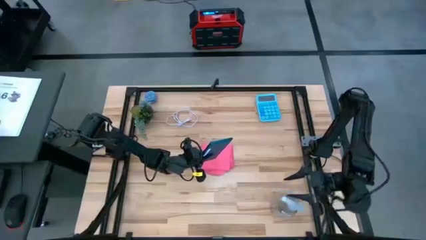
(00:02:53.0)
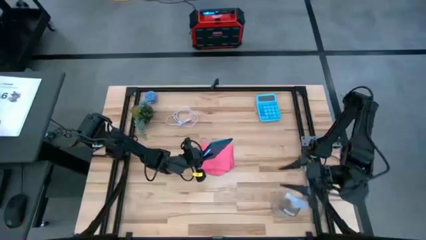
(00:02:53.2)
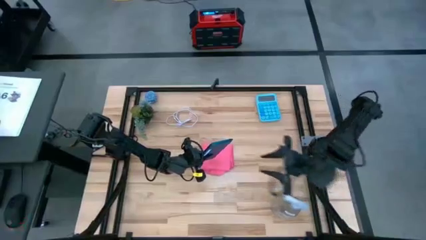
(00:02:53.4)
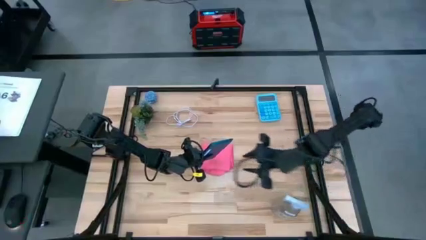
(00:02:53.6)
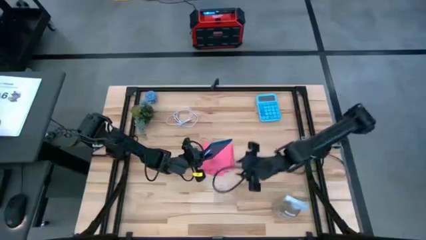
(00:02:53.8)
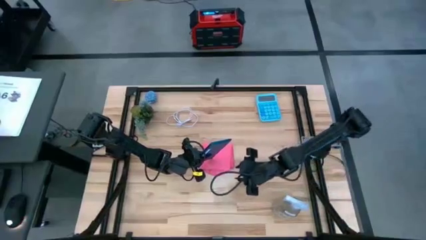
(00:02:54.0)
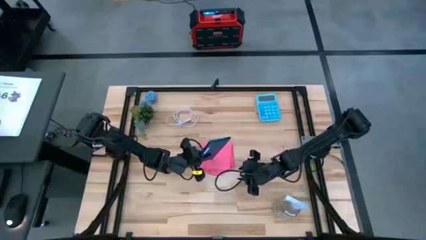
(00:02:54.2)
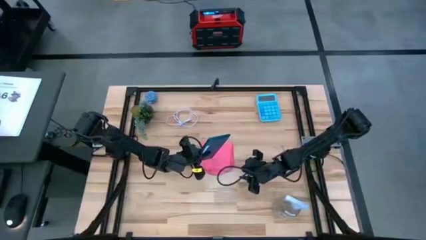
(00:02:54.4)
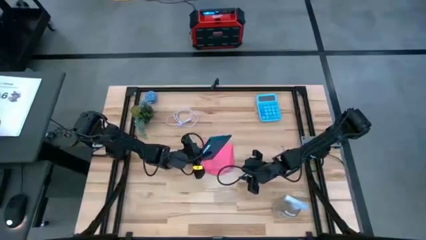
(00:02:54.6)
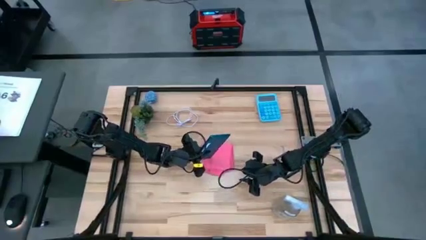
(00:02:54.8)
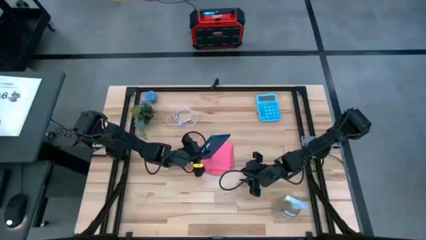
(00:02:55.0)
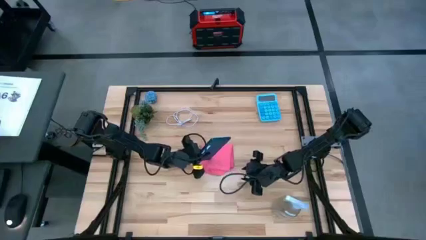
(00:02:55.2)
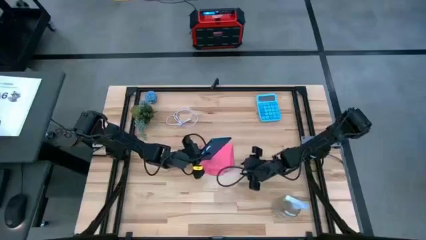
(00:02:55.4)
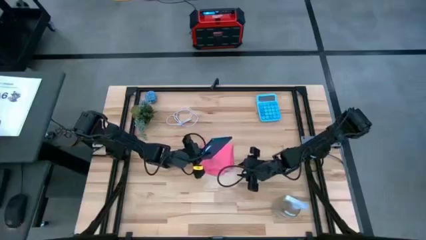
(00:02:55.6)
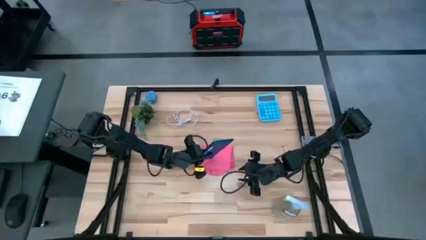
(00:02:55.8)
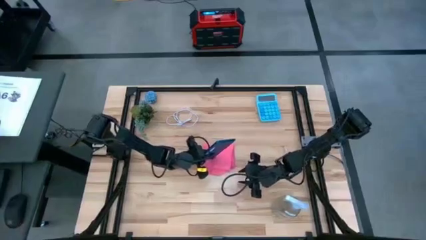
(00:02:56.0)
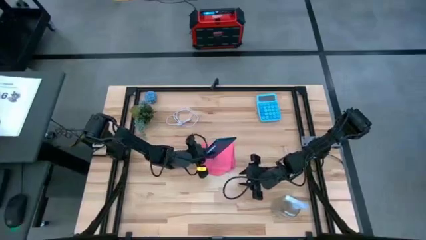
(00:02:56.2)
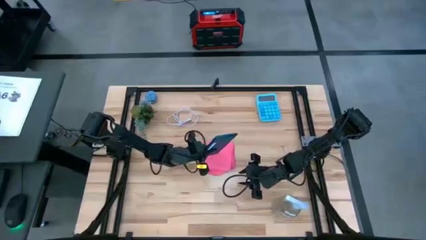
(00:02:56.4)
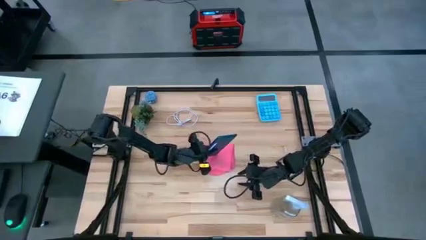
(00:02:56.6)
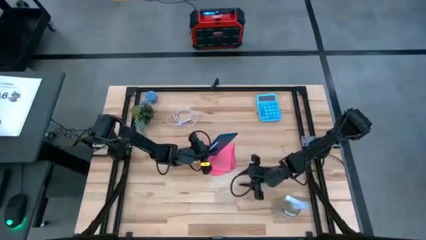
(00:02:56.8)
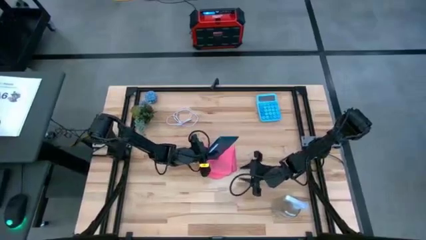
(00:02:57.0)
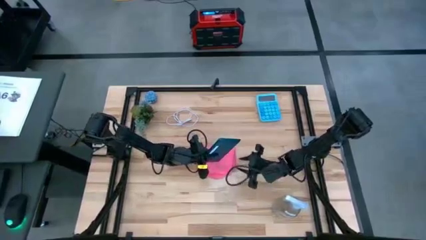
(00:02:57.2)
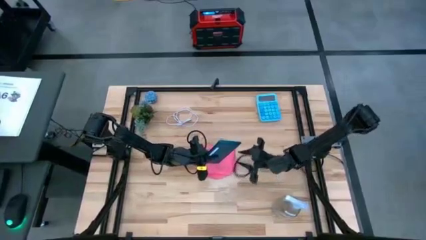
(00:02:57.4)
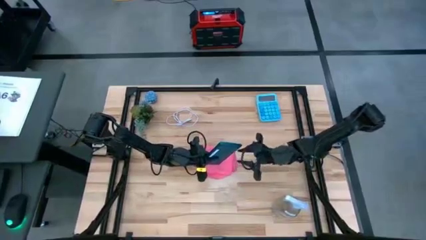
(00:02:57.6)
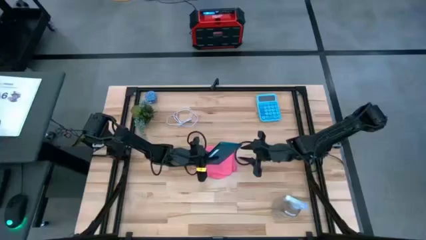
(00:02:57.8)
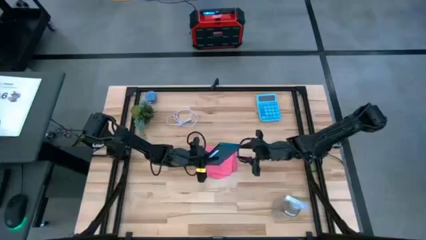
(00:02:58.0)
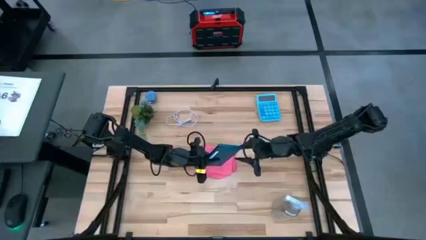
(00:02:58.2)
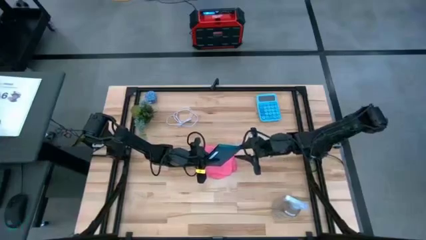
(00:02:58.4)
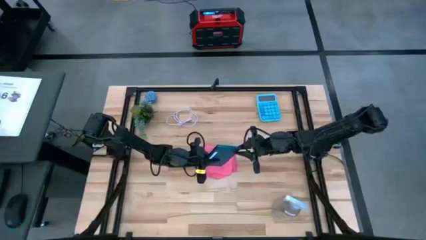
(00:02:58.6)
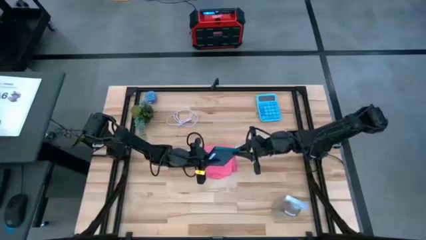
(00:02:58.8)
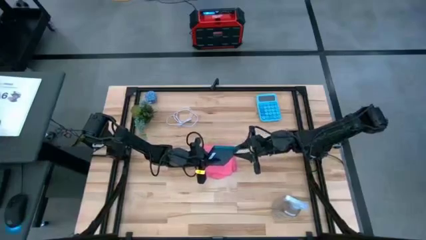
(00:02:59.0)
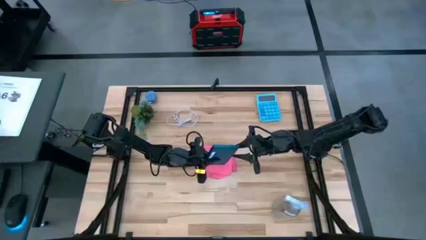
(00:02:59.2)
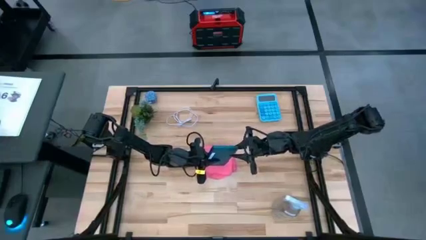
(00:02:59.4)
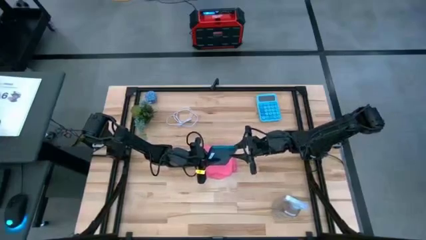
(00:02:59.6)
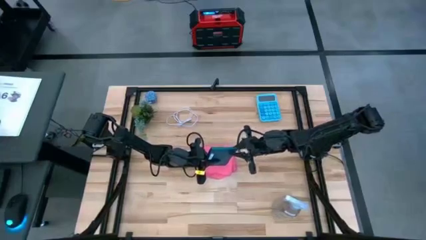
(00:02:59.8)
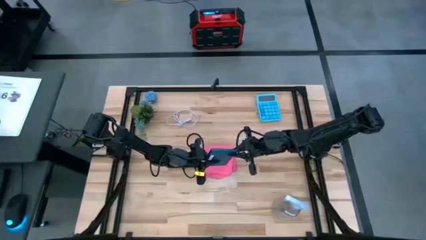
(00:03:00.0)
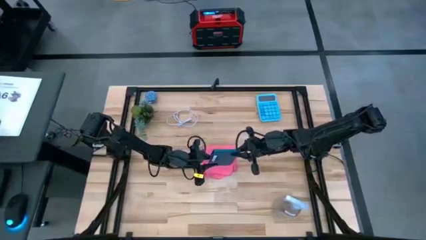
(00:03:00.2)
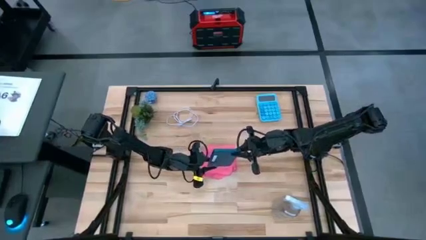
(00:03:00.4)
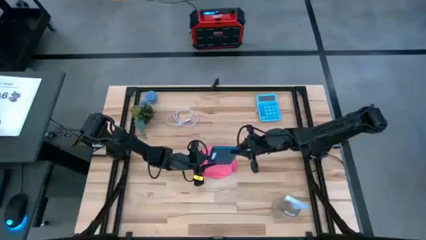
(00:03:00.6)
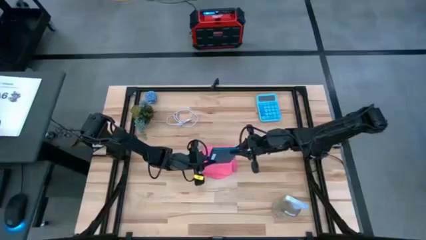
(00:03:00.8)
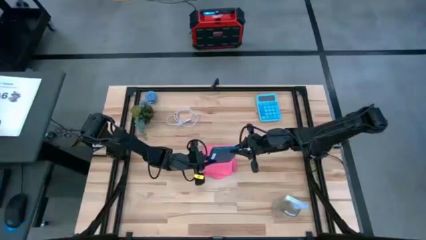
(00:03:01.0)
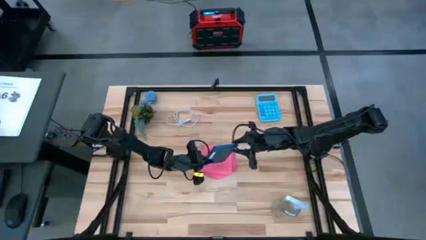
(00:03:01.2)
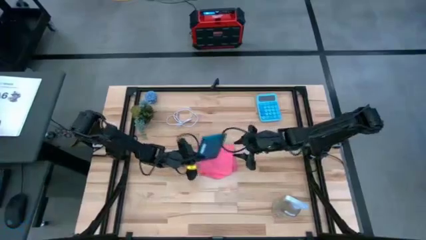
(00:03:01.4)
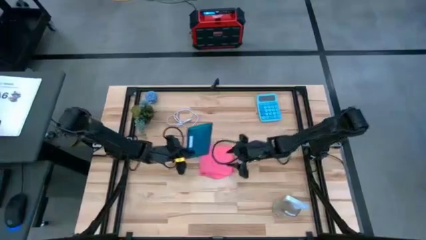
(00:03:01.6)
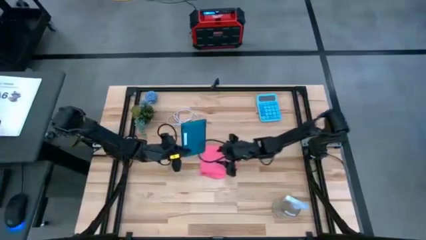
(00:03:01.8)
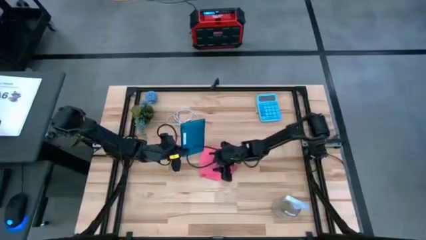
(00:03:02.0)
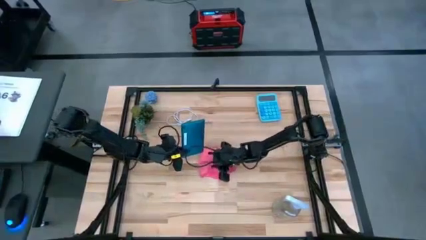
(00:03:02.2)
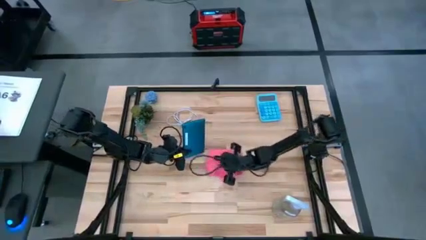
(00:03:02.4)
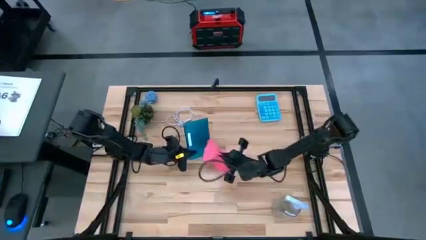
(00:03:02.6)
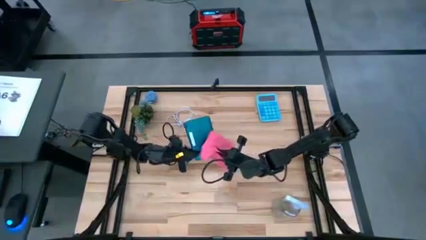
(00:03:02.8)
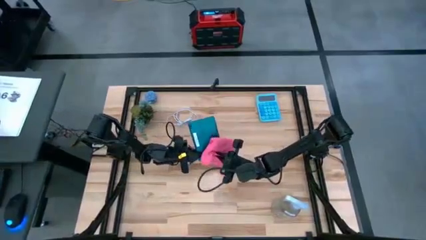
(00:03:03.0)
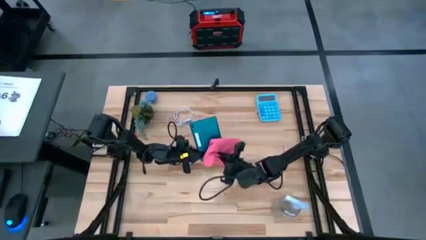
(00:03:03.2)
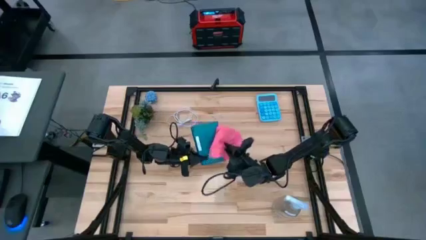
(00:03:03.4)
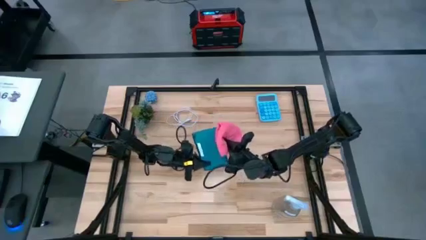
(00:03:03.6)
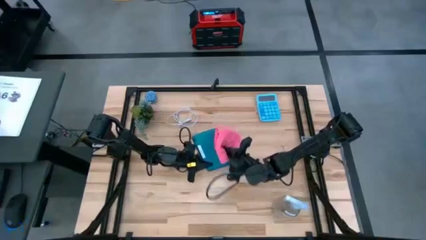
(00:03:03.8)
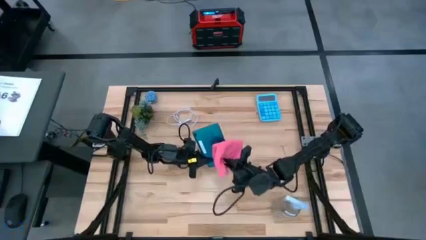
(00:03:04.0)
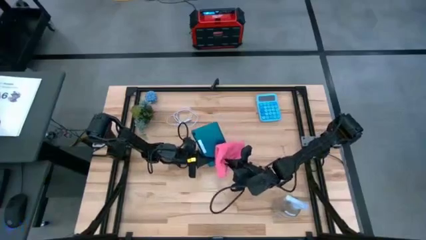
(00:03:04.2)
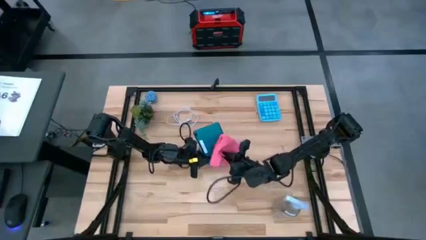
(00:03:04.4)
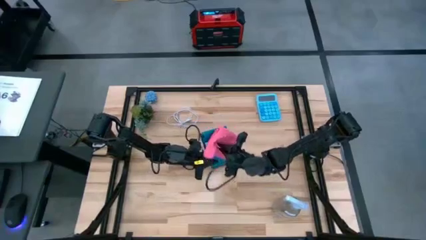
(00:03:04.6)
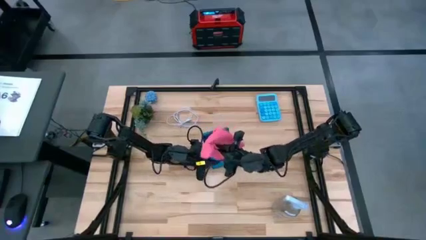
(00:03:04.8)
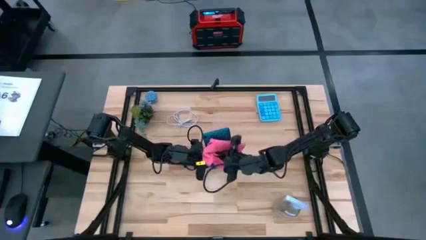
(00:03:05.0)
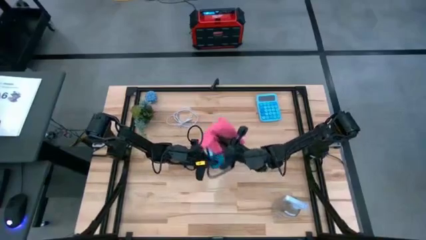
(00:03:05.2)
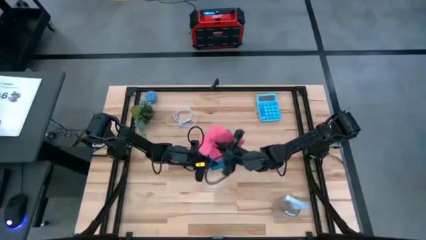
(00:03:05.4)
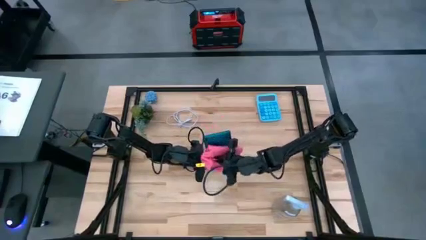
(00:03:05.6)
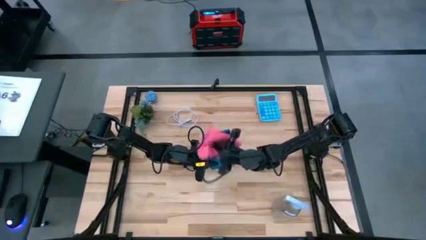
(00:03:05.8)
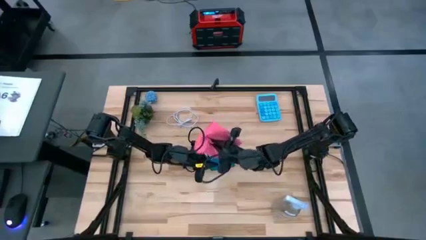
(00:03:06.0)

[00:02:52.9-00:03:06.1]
Task: Apply microfiber cloth
Wipe the back of the cellphone with the pink microfiber cloth
